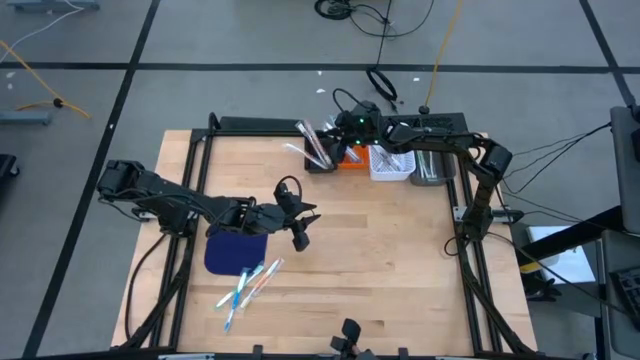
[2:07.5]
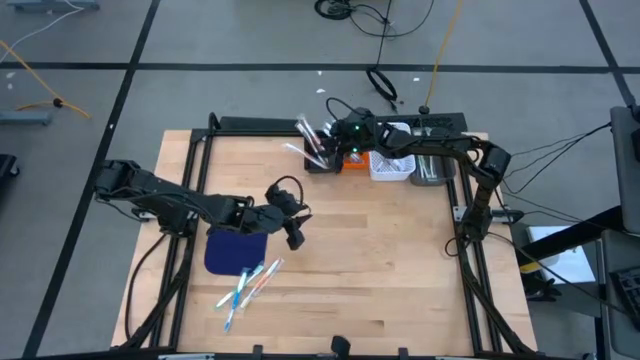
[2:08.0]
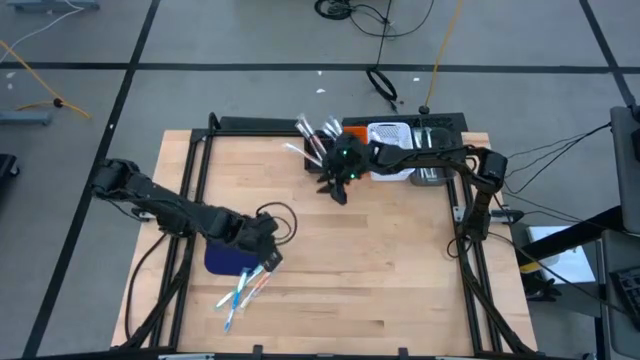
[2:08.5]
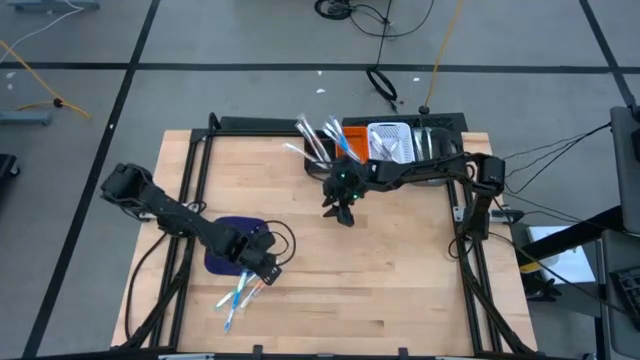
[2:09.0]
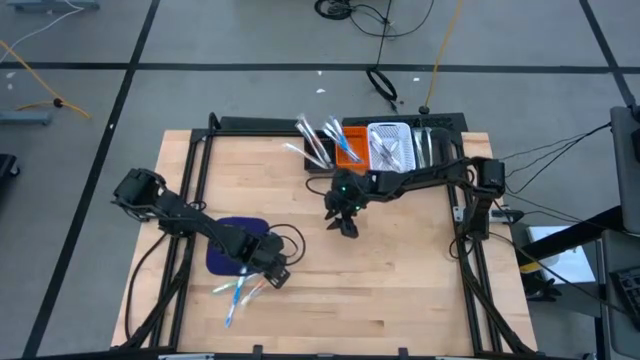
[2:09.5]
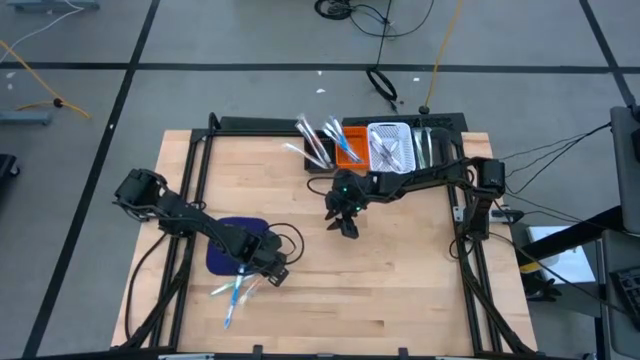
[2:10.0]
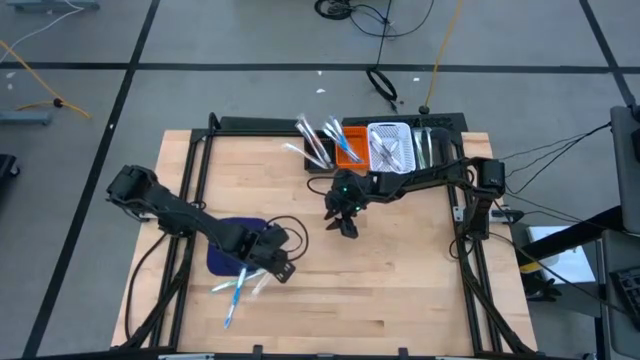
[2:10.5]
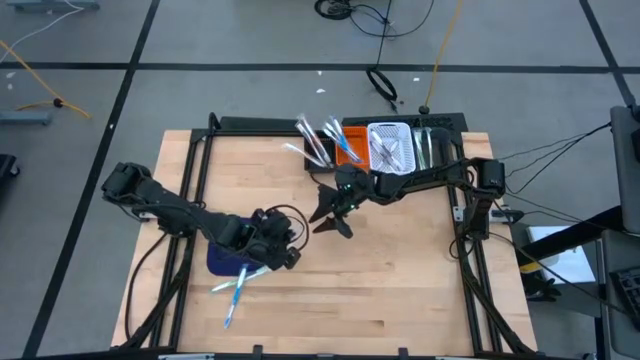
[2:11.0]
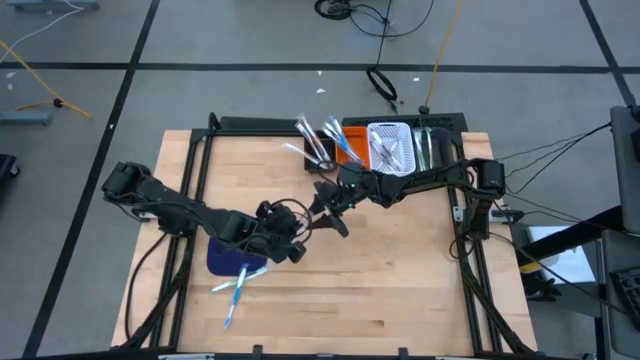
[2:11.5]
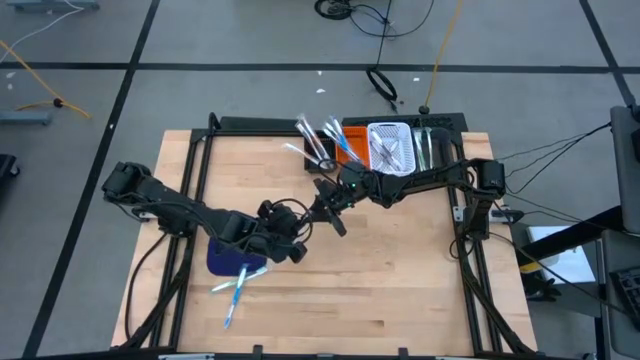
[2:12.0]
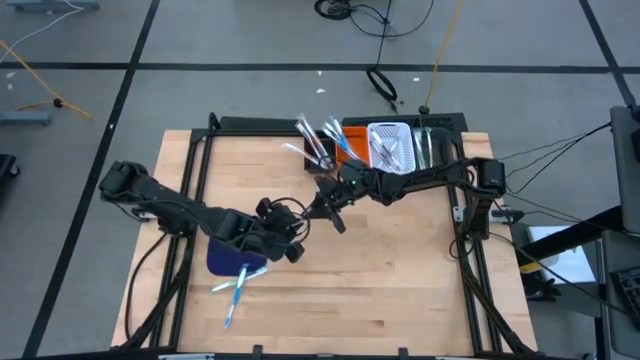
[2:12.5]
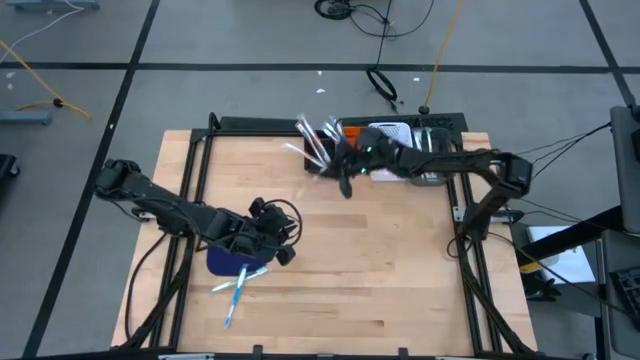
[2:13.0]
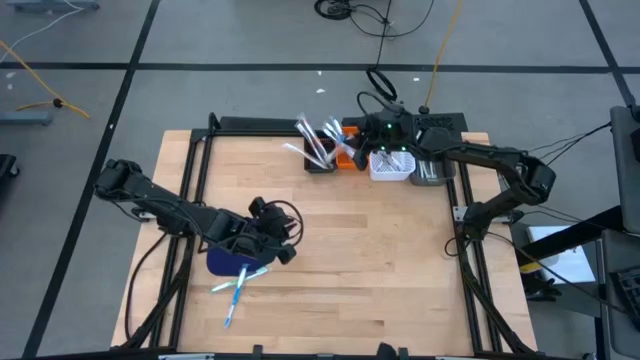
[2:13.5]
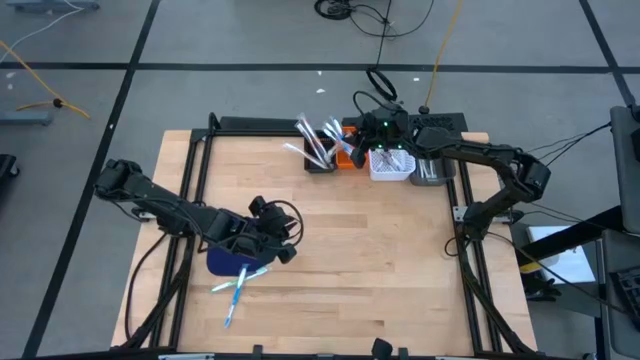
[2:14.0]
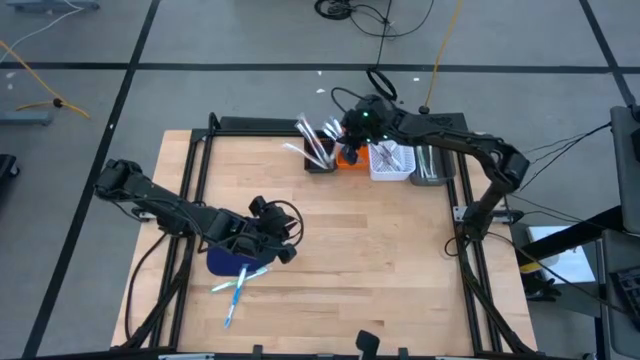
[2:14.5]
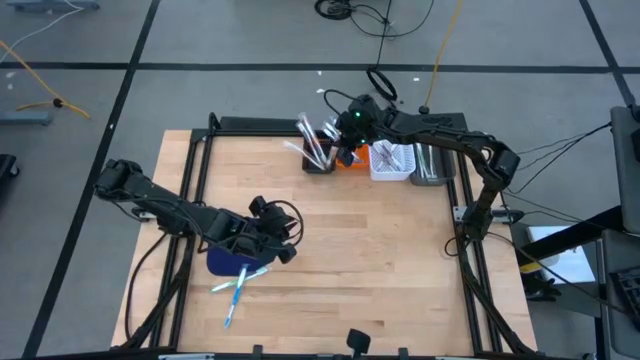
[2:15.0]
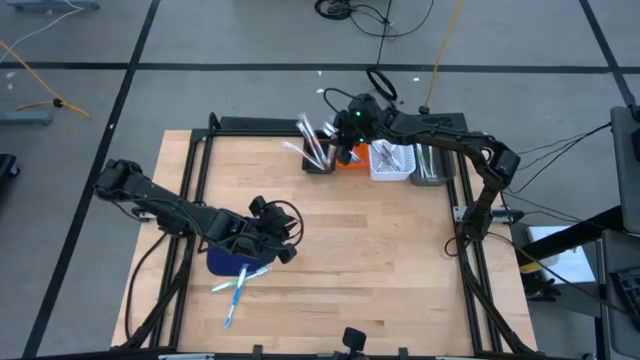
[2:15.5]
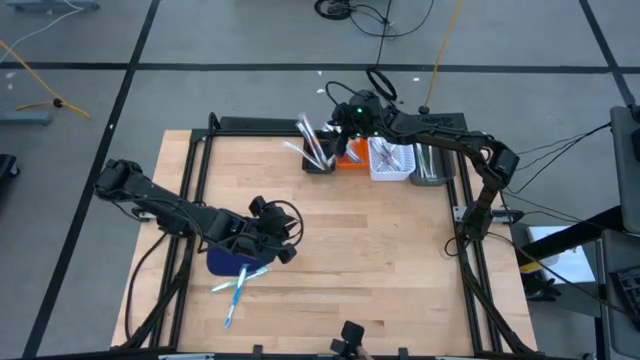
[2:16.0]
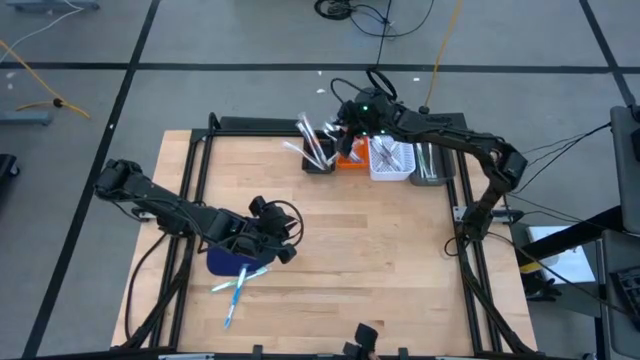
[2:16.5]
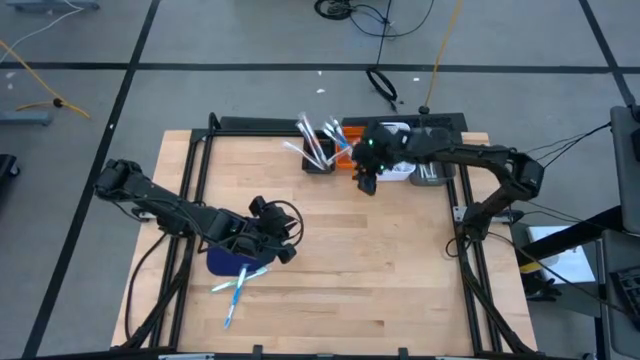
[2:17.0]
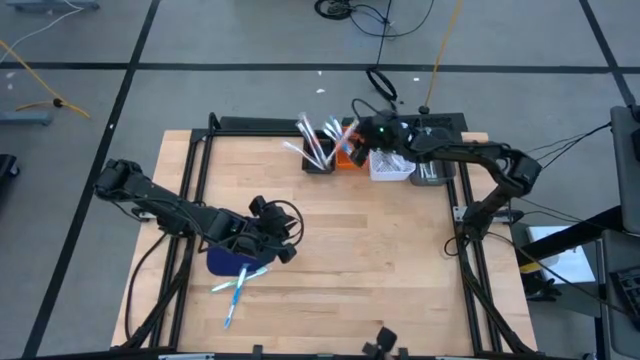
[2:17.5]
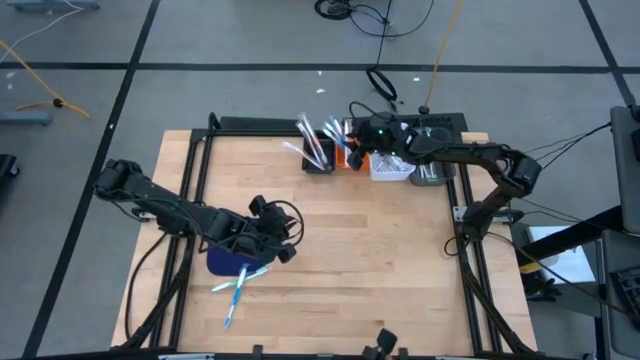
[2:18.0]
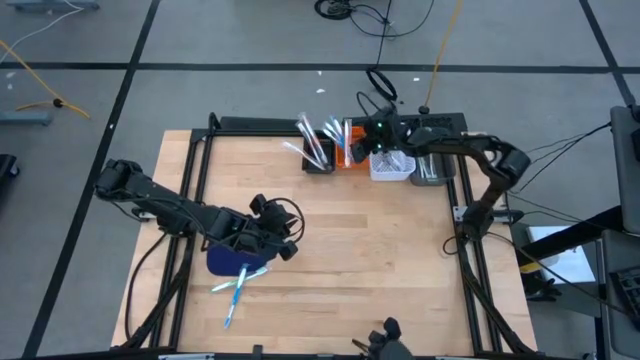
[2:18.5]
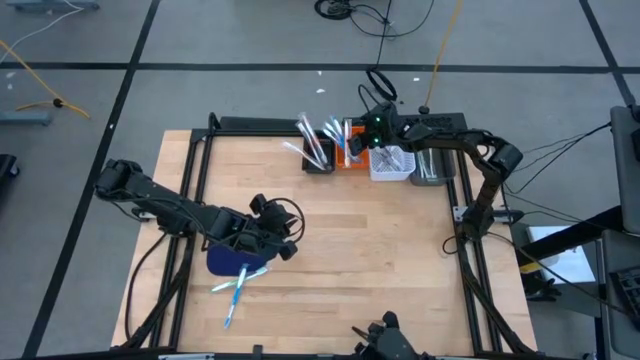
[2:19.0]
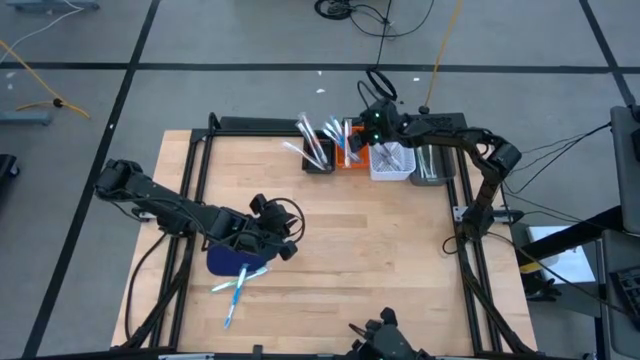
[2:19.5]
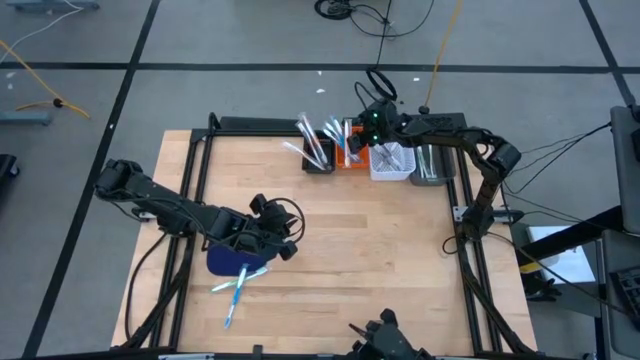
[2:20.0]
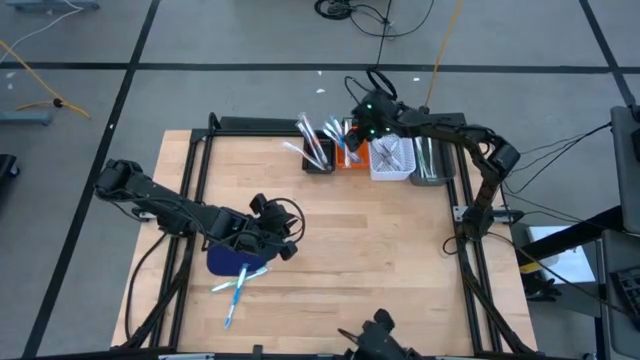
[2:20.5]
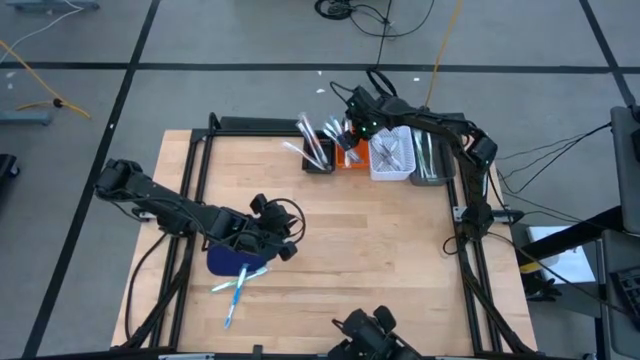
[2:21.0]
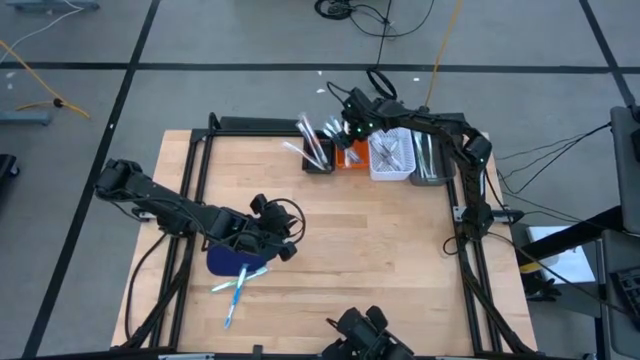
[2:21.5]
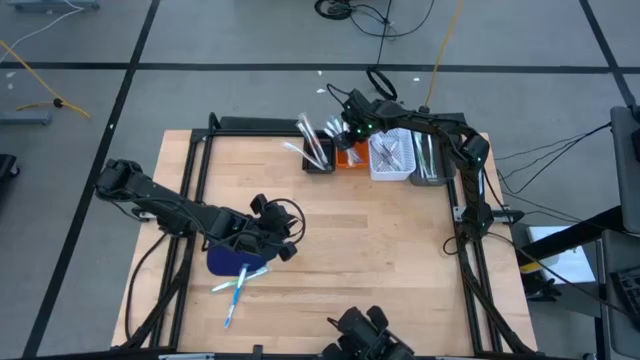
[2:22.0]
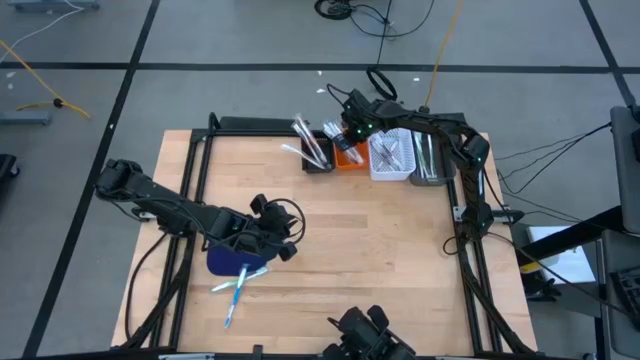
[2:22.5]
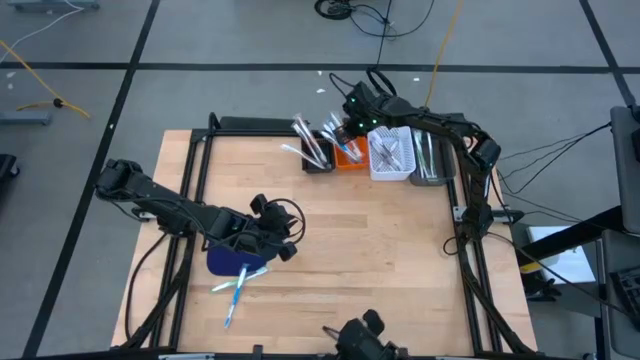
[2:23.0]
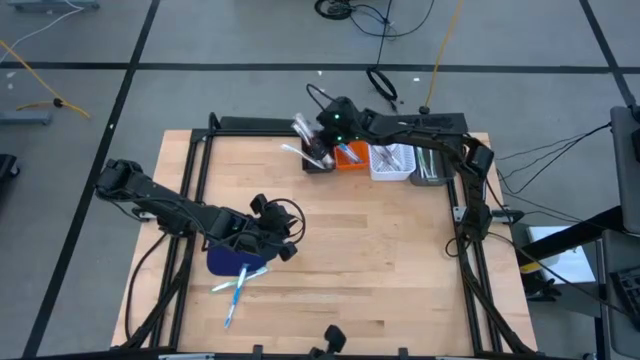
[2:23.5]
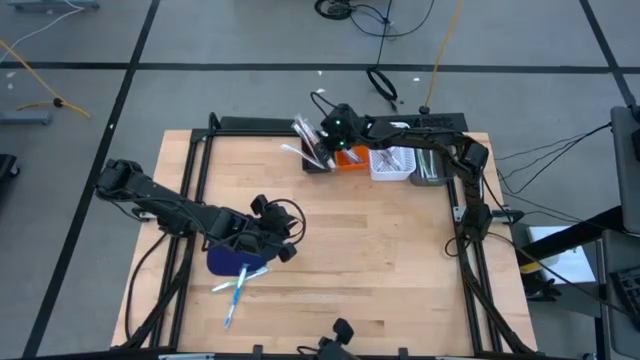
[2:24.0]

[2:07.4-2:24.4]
Task: Pick & Place Toothbrushes
Put the orange toothbrush into the black bin

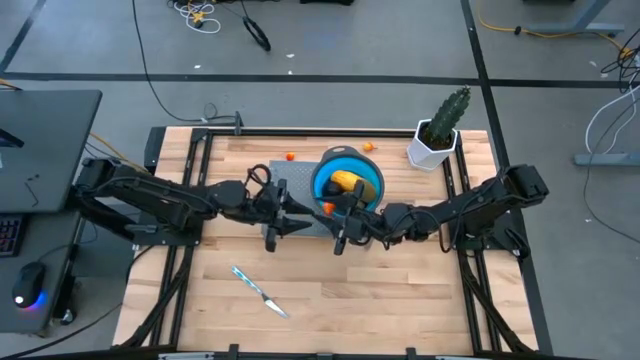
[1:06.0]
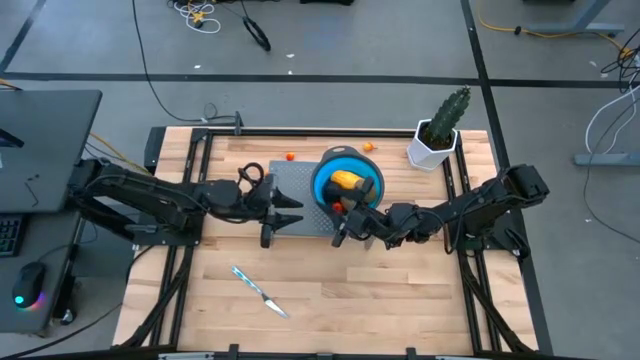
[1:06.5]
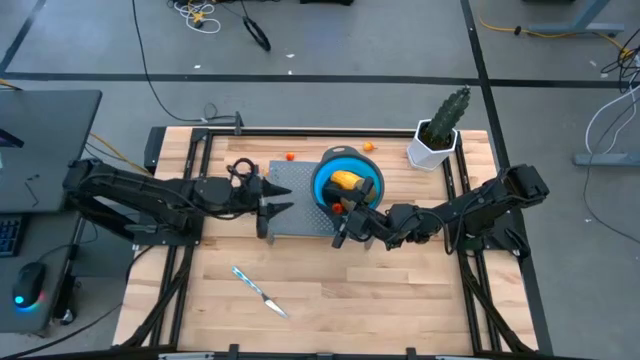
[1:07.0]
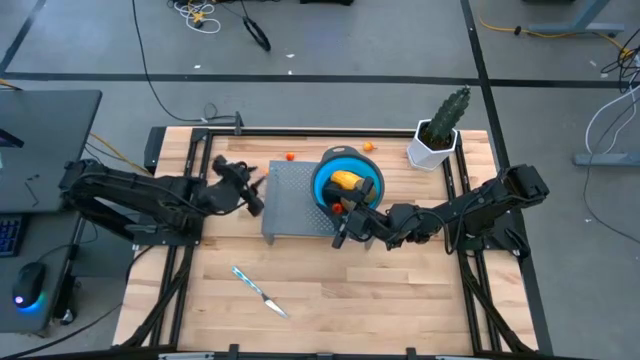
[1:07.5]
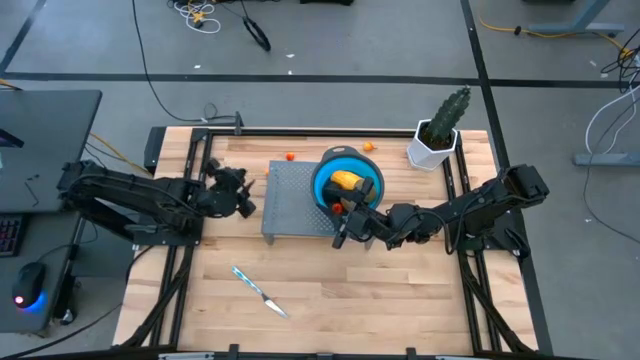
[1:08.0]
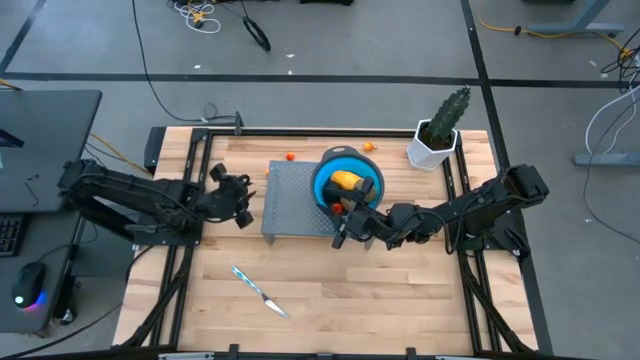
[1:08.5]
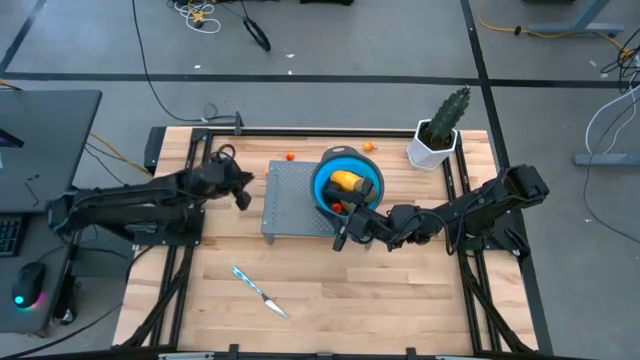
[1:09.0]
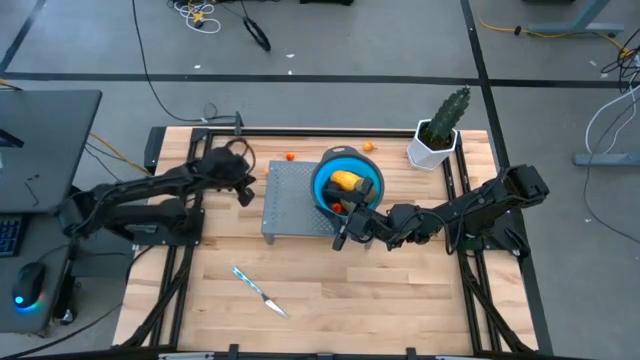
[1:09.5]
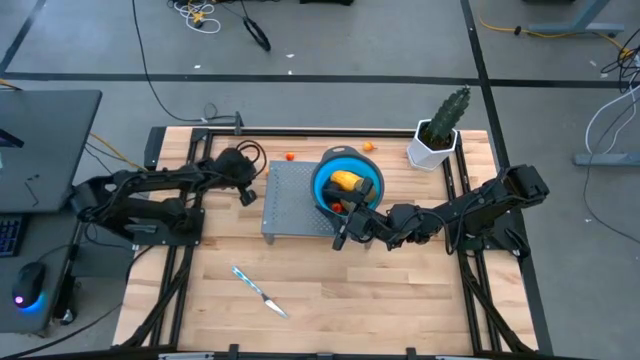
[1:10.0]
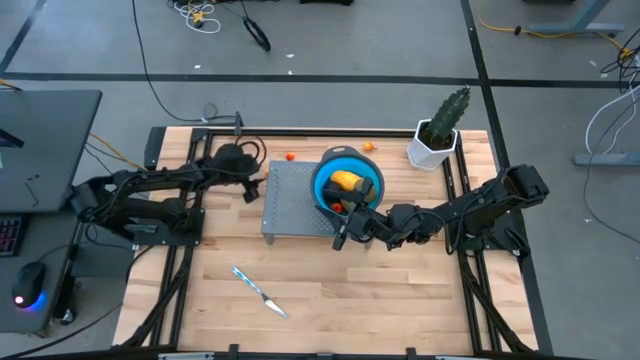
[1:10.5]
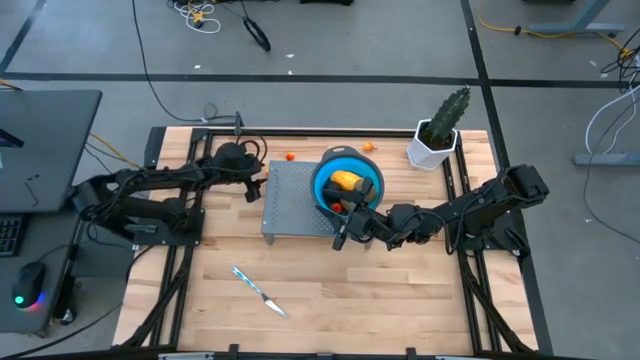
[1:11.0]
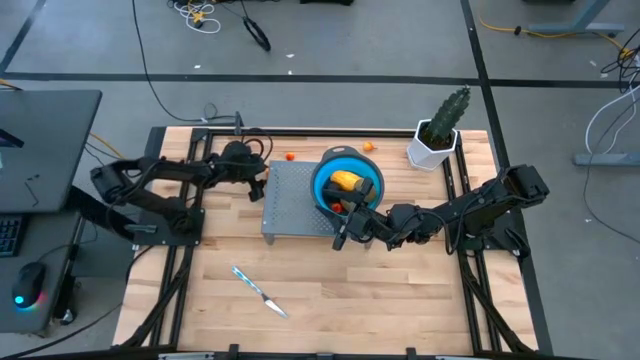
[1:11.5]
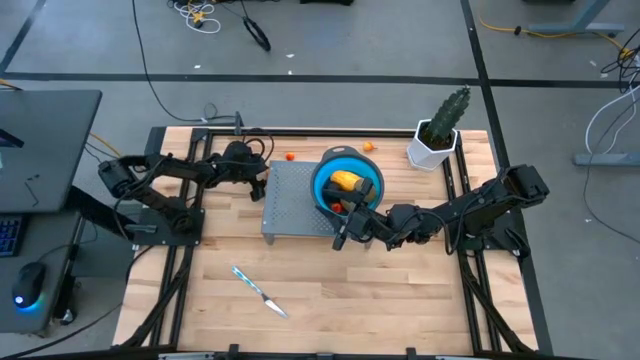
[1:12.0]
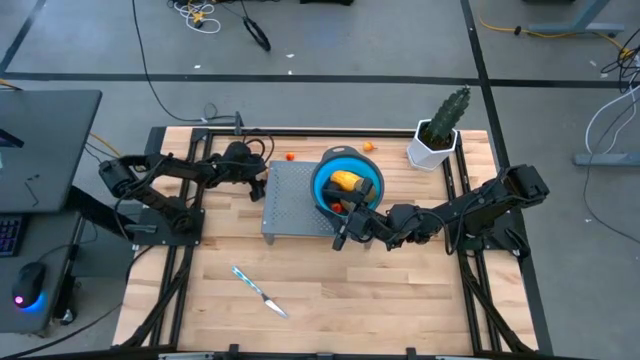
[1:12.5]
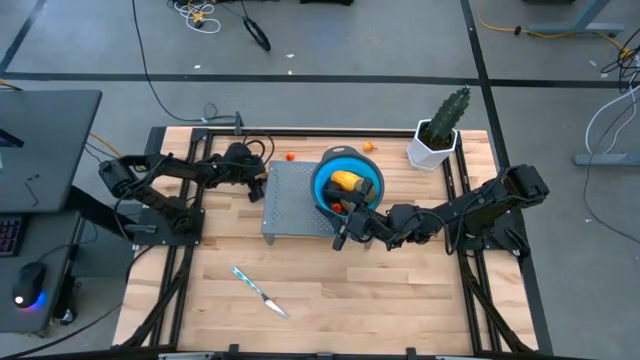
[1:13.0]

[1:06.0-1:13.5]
Task: Pick & Place Fruit
Put the orange pear into the blue strainer bowl on the shelf
